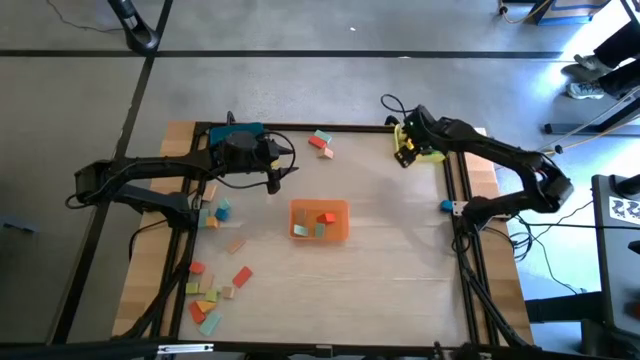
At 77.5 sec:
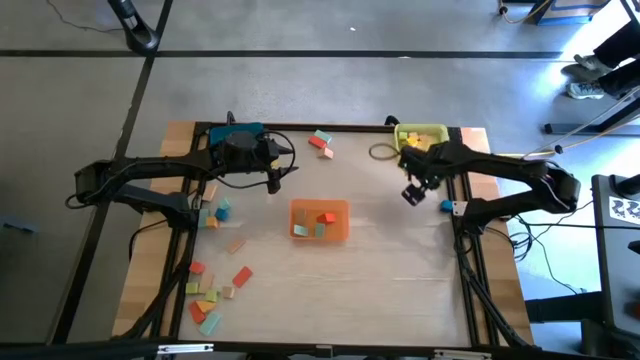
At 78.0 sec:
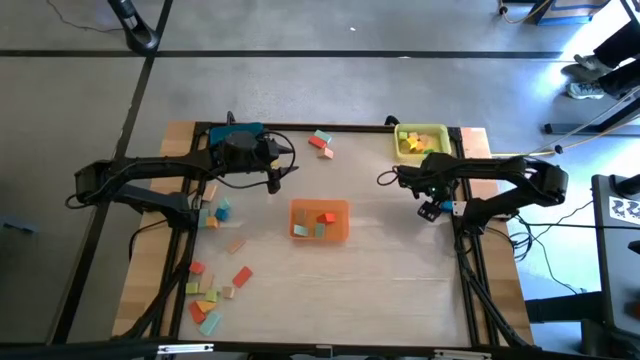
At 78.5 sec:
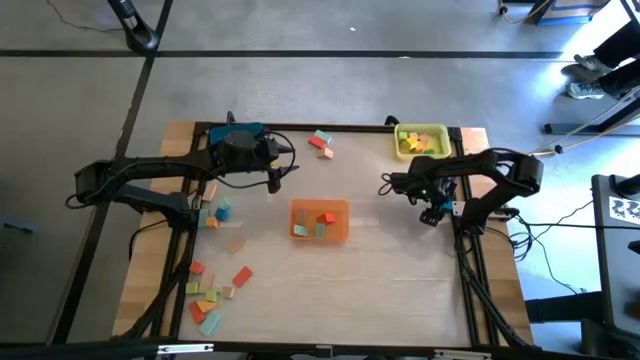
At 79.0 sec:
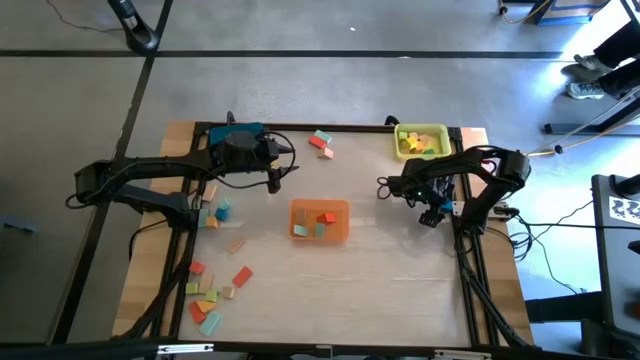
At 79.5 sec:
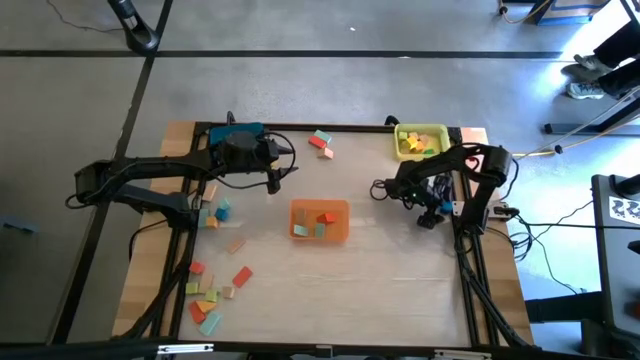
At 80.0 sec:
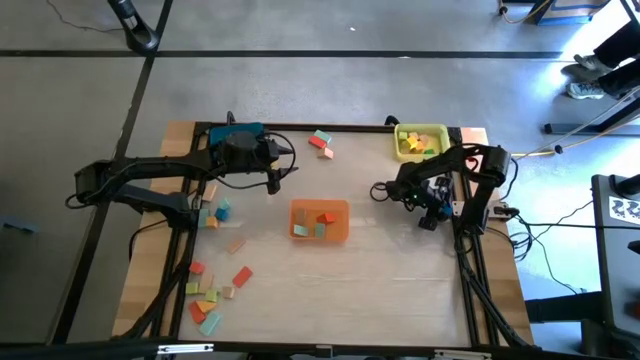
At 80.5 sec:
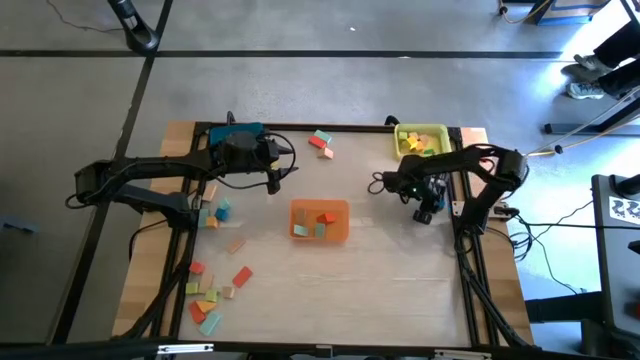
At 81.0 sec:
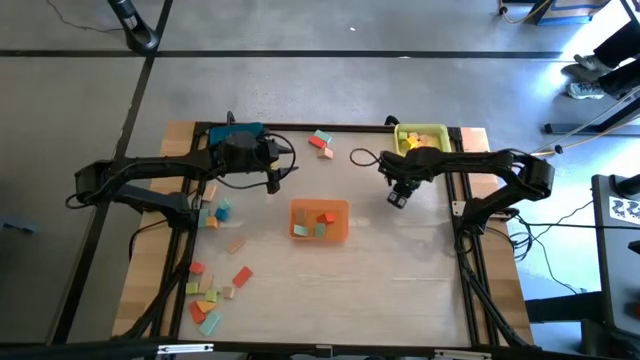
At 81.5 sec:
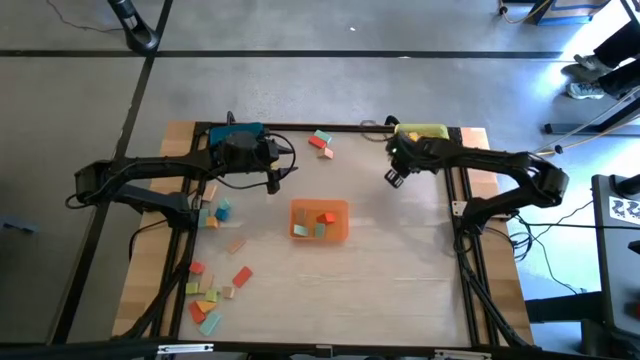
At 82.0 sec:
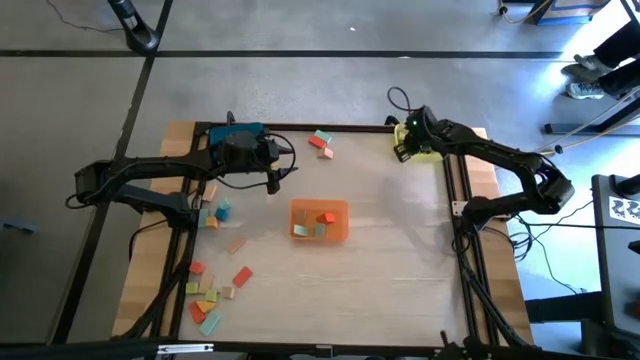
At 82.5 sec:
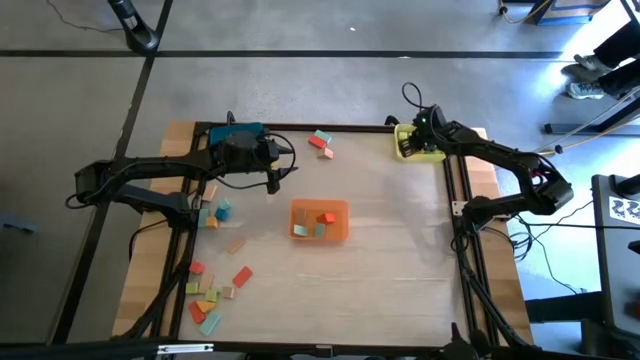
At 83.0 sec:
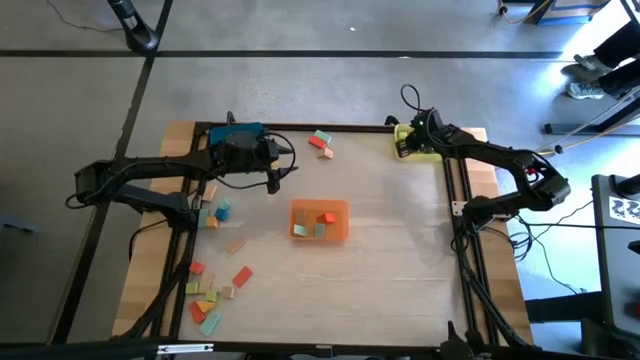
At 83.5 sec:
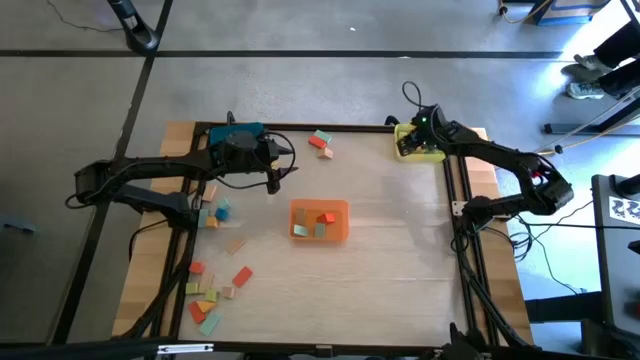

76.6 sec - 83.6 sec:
Task: Sort blocks by size
Put the dark blue cube block into the yellow bin

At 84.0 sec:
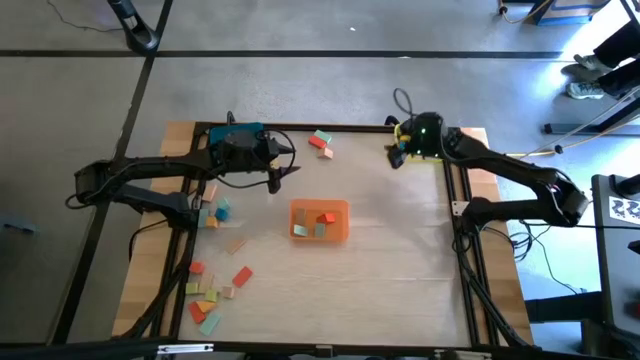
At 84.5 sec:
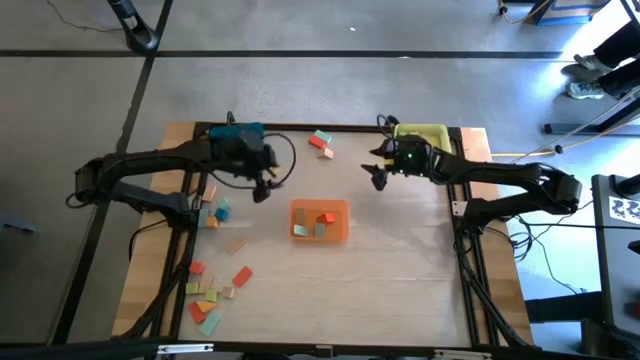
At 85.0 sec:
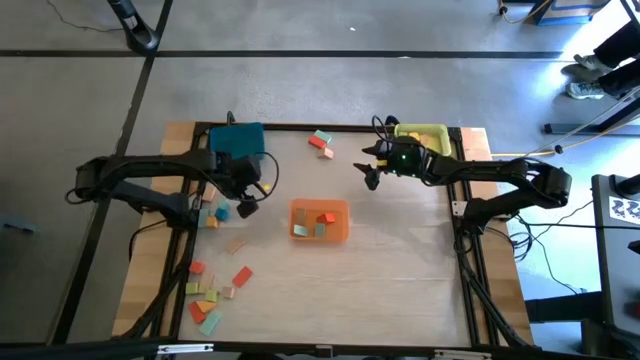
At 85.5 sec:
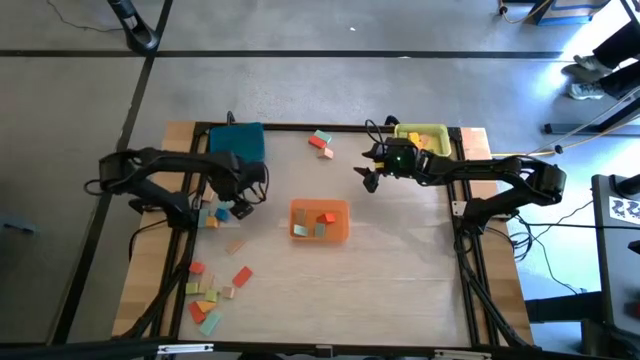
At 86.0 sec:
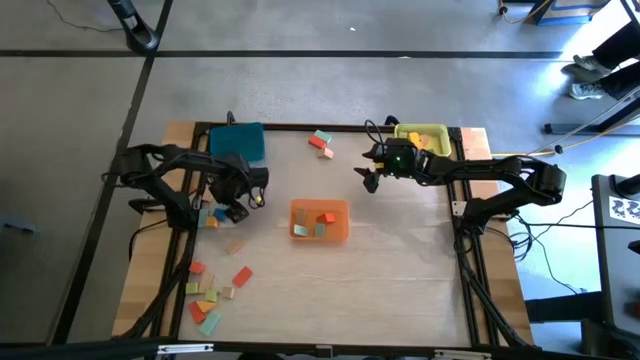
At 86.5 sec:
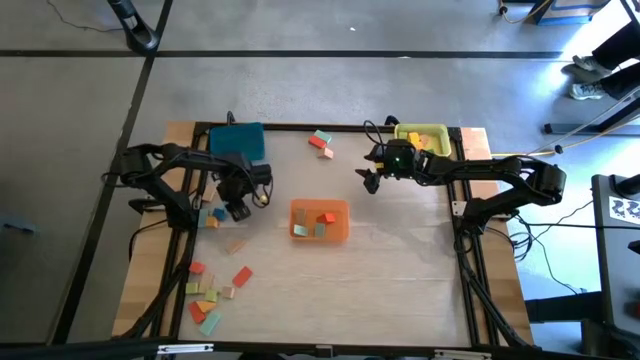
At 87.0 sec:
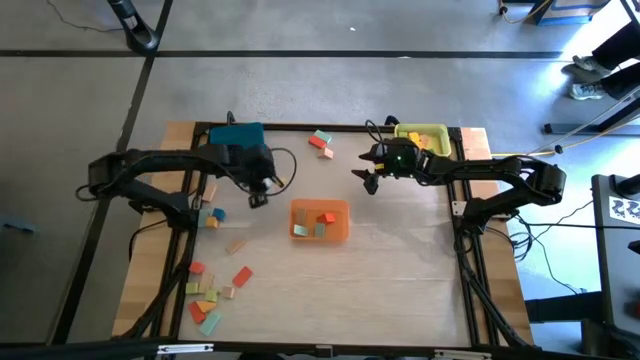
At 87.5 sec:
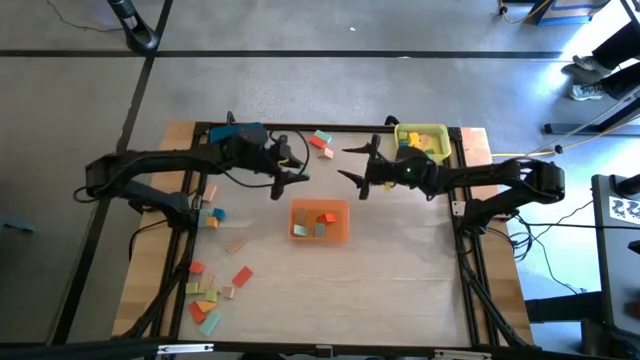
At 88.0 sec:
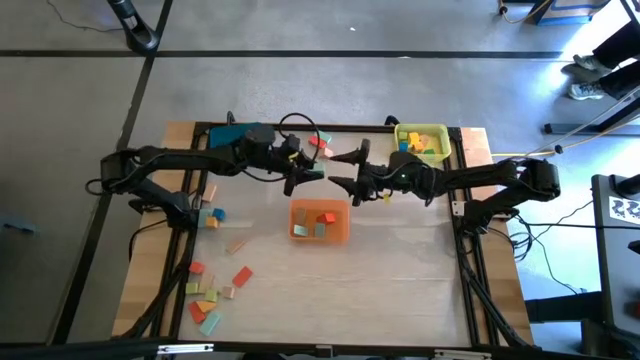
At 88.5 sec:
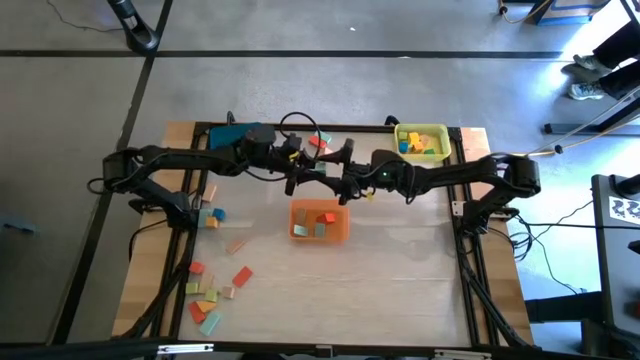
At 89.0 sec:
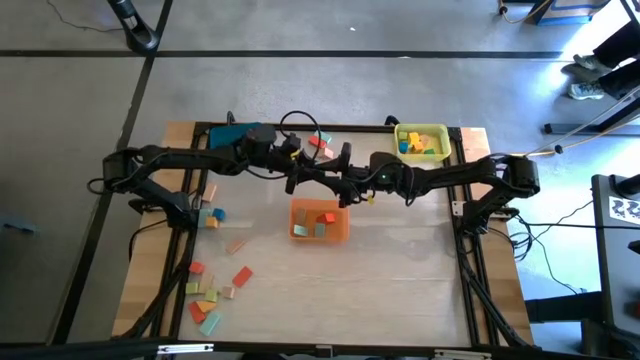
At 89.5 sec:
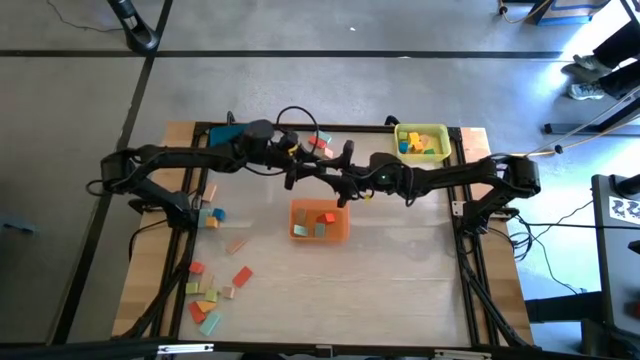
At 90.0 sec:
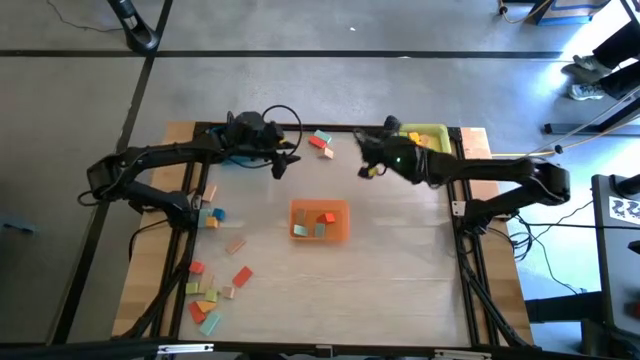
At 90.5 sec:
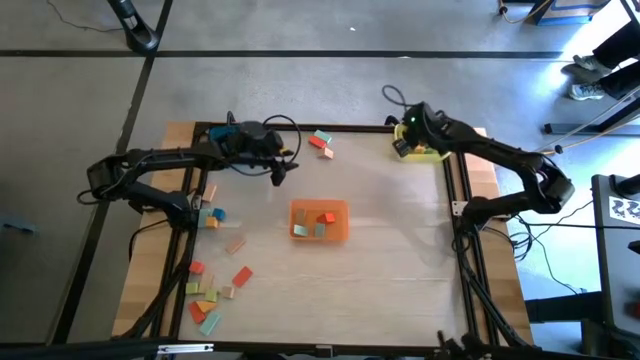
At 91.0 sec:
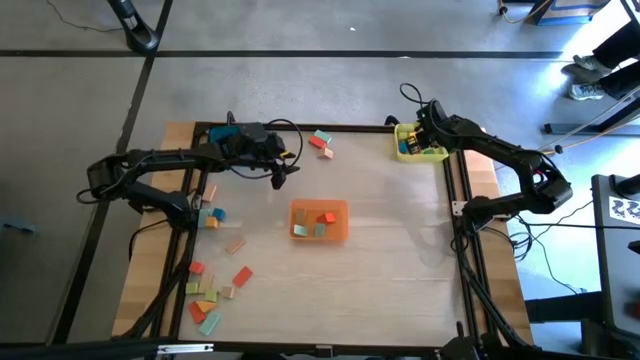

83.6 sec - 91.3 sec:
Put the light blue cube block into the yellow bin

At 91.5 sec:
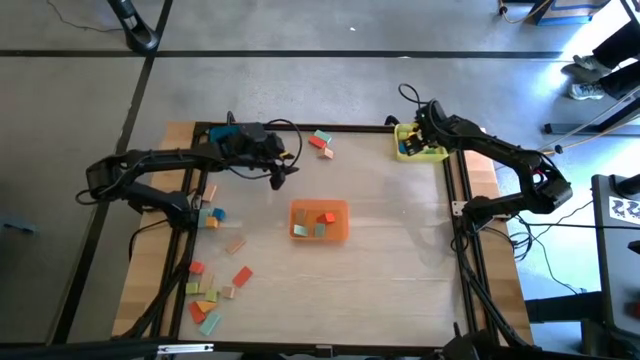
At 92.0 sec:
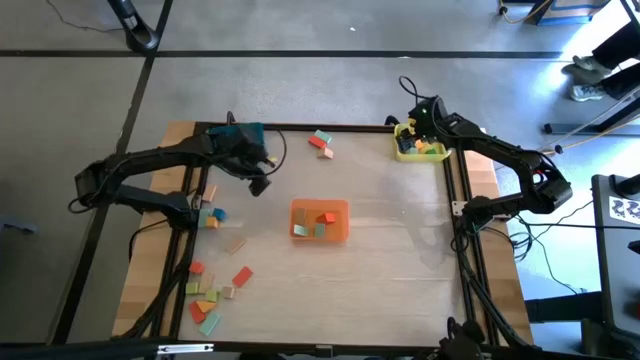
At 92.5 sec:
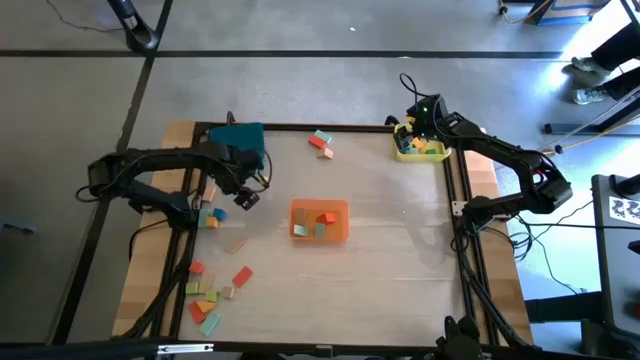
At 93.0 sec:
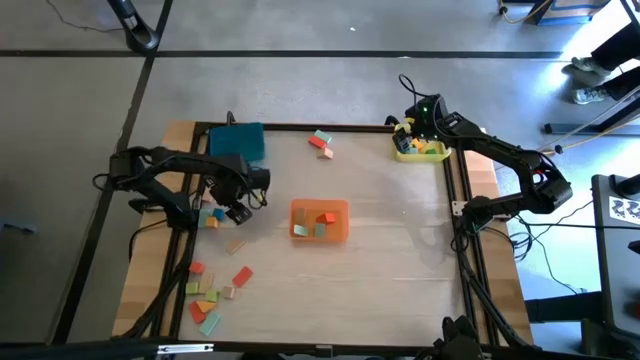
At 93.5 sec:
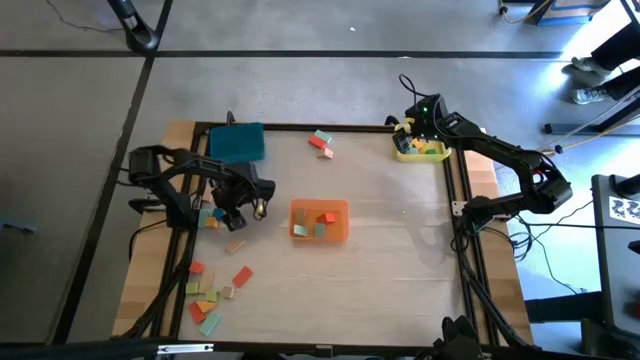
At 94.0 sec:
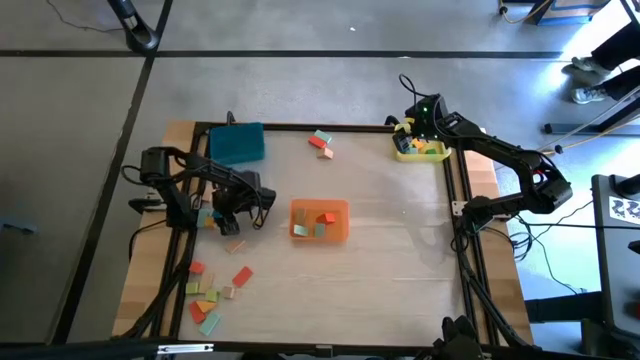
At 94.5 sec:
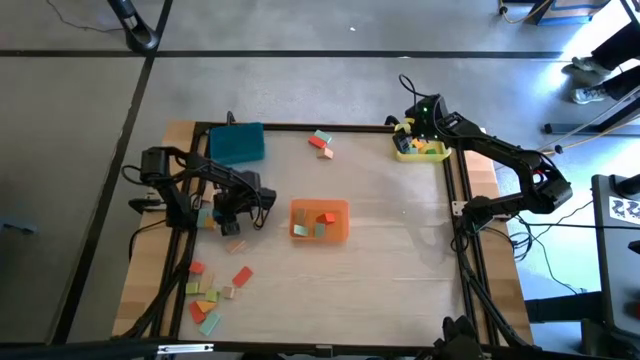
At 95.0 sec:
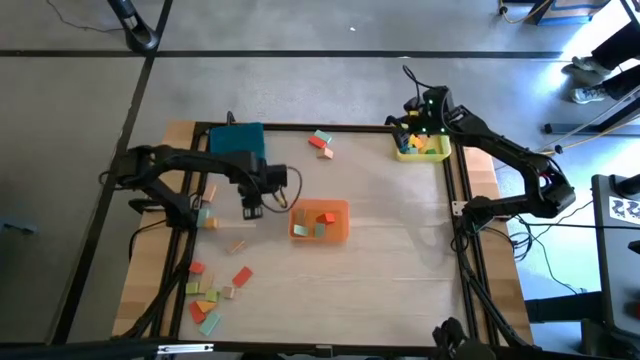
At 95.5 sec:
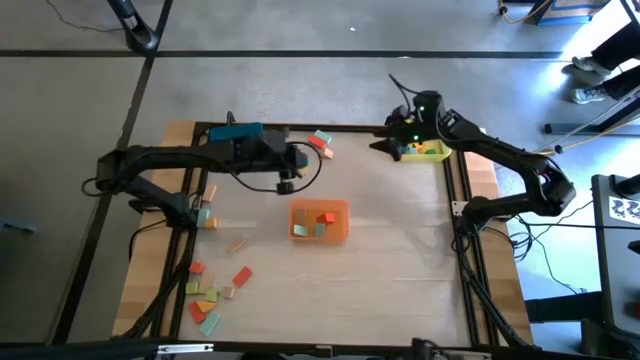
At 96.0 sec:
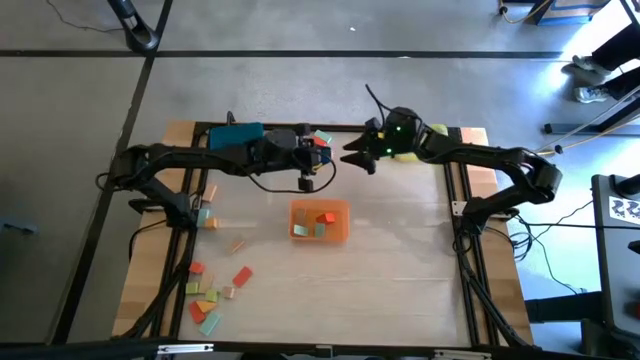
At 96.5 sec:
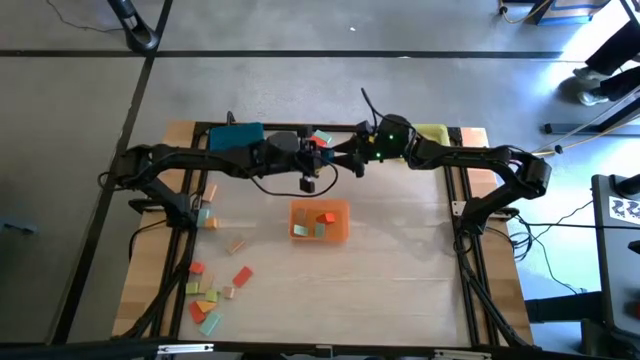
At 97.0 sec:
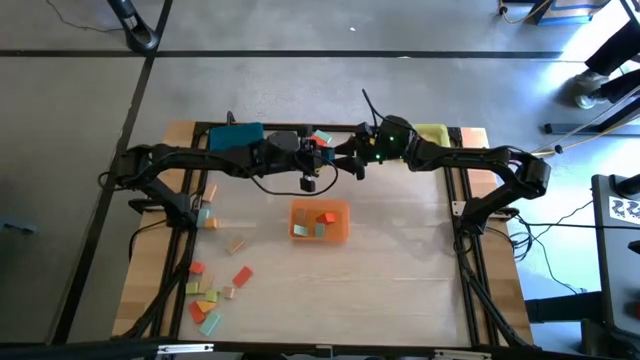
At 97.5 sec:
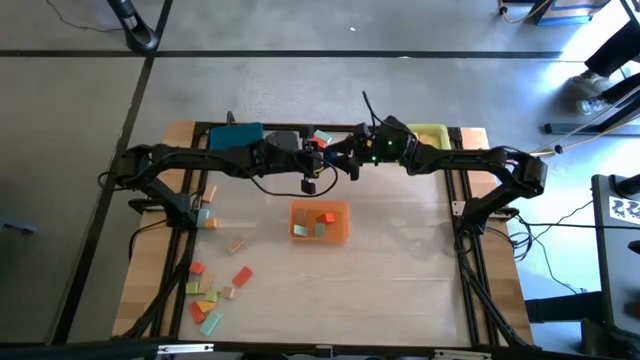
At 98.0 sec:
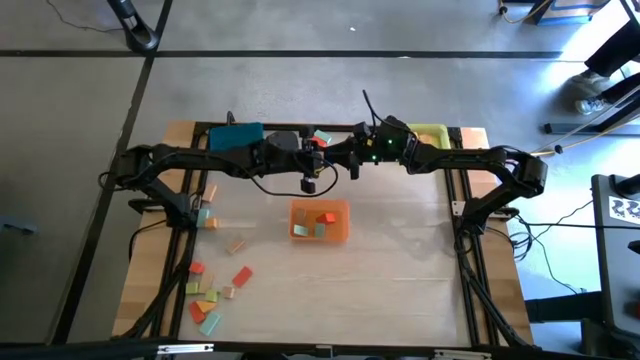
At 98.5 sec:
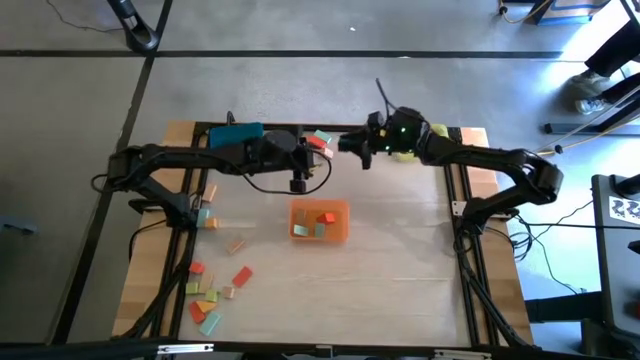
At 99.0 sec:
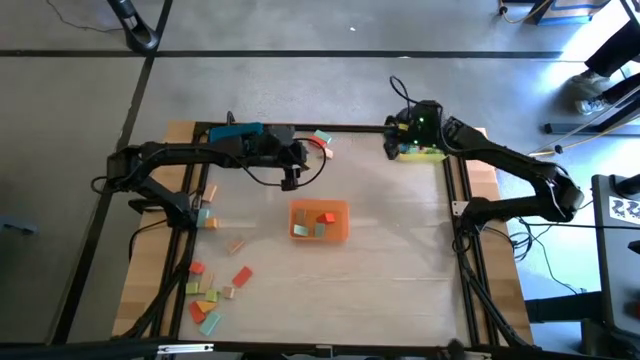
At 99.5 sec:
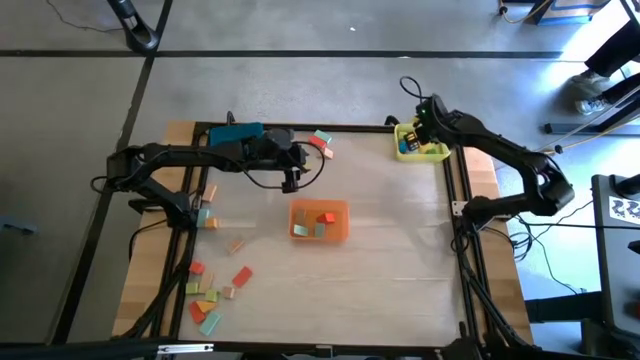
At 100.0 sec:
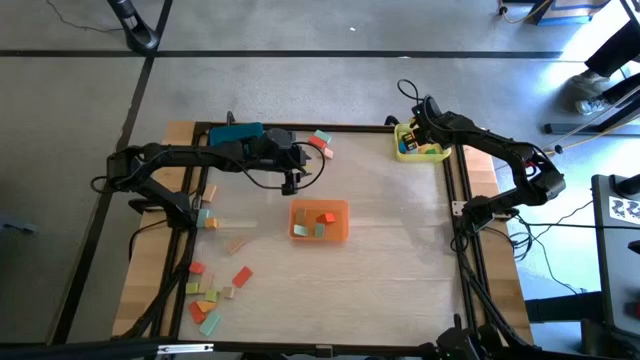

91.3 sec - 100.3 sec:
Put the dark blue cube block into the yellow bin
